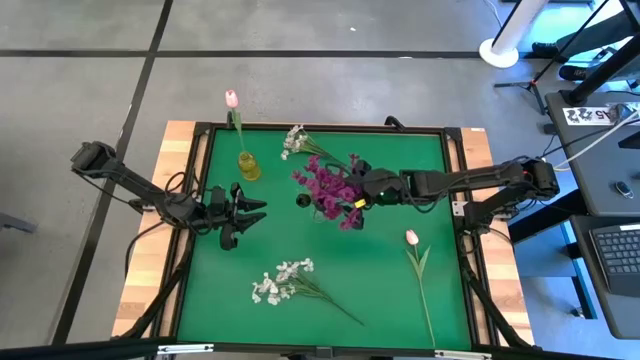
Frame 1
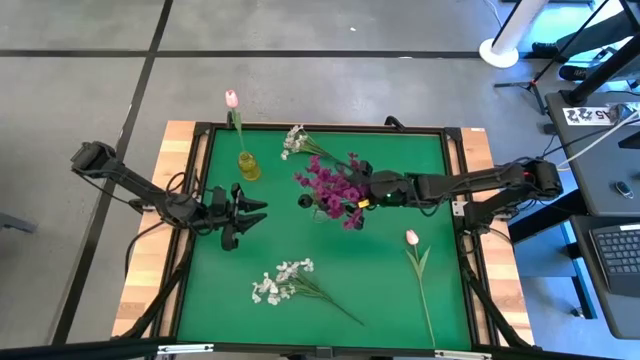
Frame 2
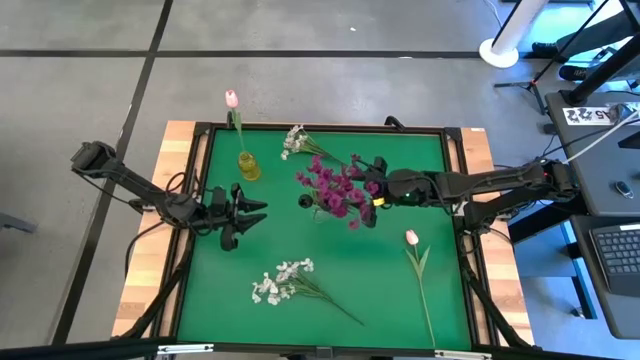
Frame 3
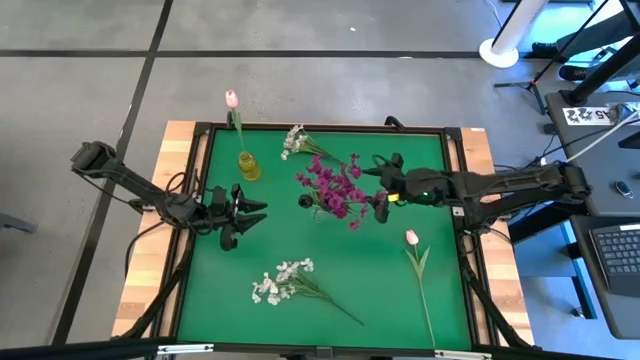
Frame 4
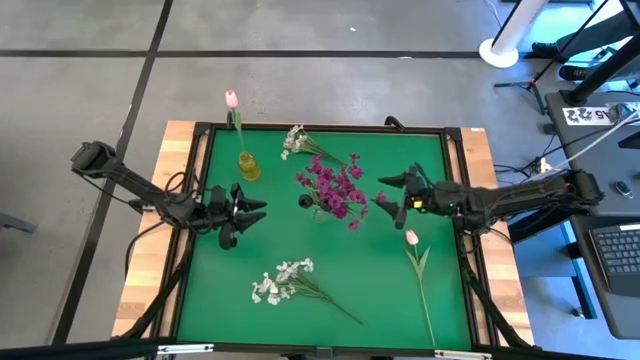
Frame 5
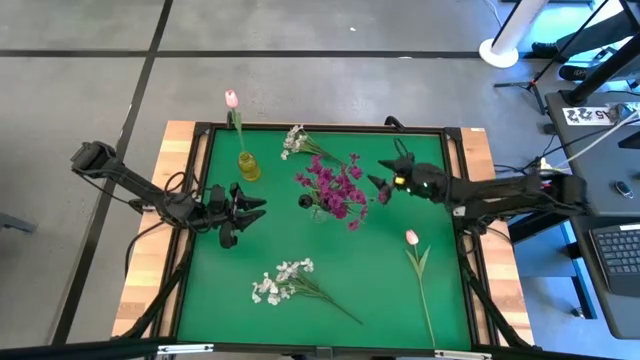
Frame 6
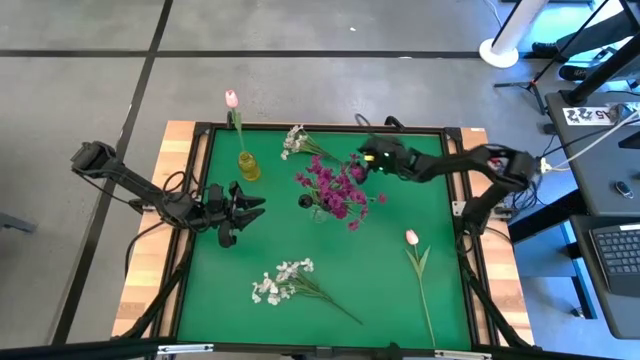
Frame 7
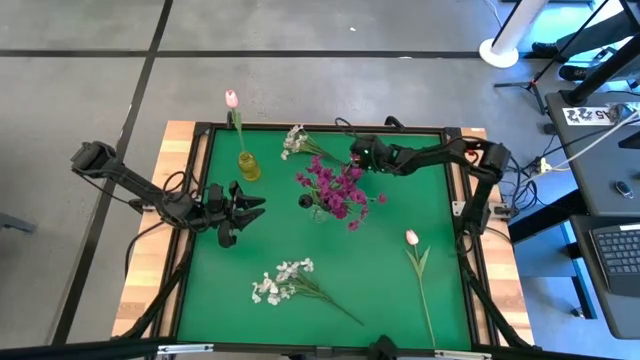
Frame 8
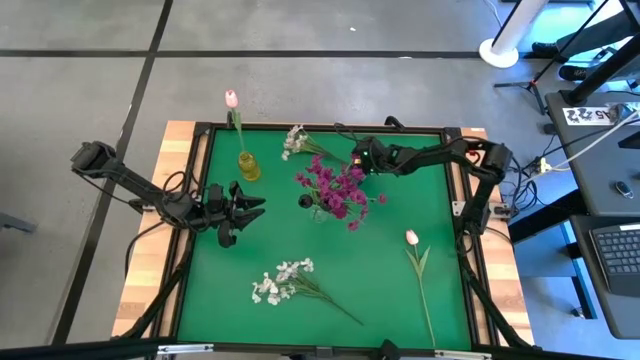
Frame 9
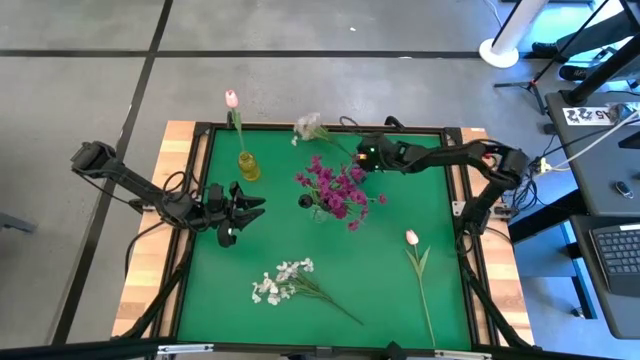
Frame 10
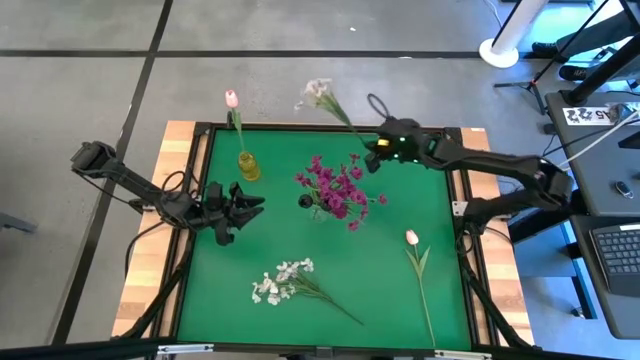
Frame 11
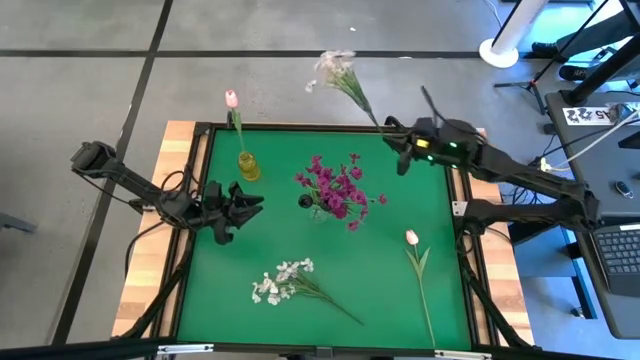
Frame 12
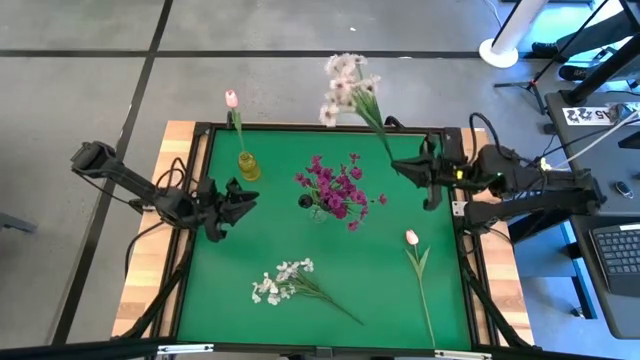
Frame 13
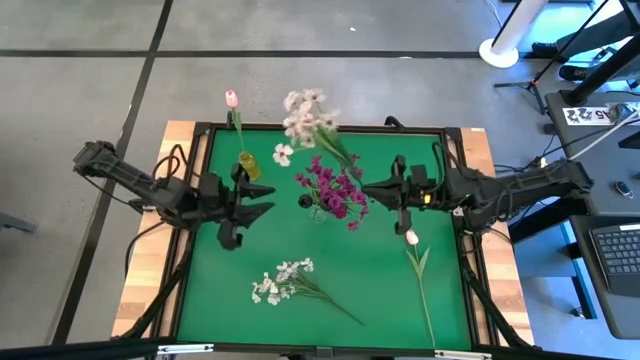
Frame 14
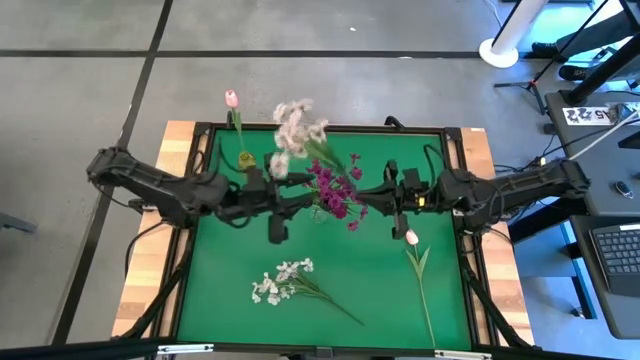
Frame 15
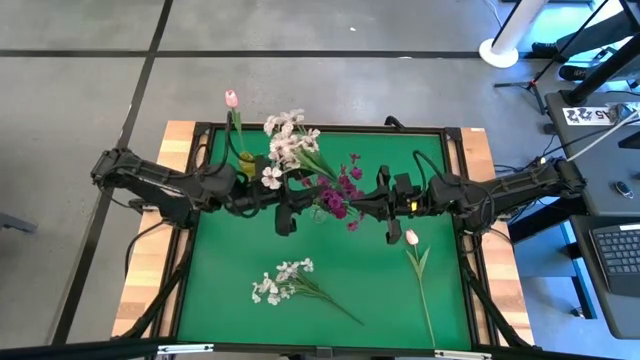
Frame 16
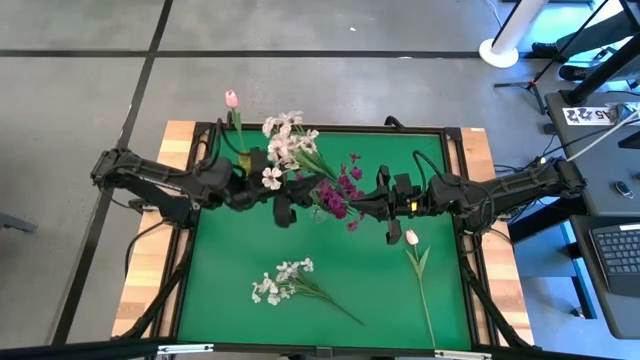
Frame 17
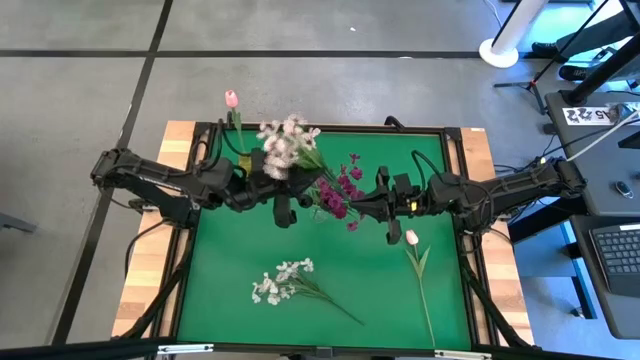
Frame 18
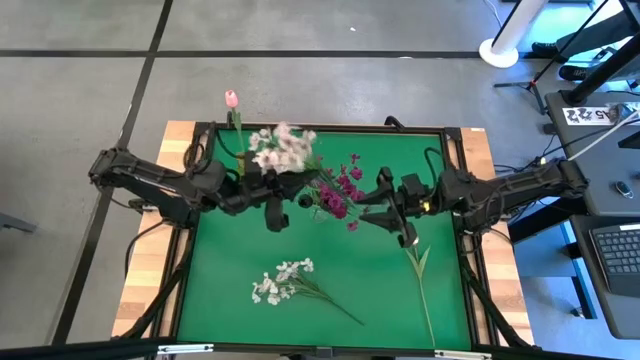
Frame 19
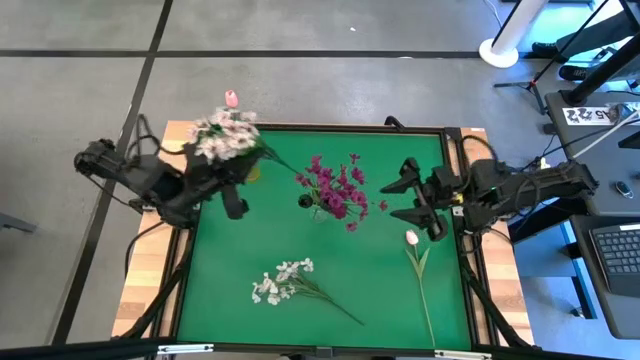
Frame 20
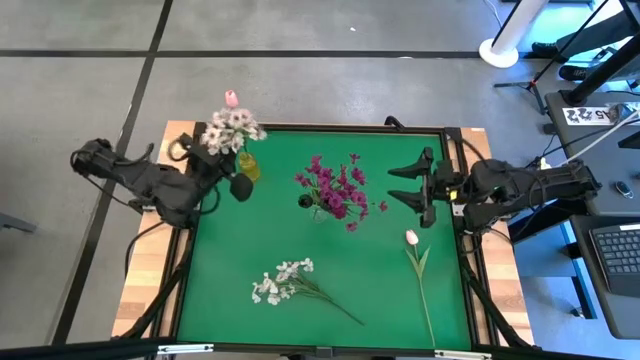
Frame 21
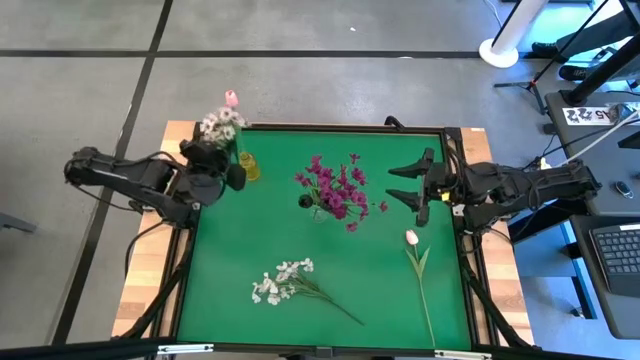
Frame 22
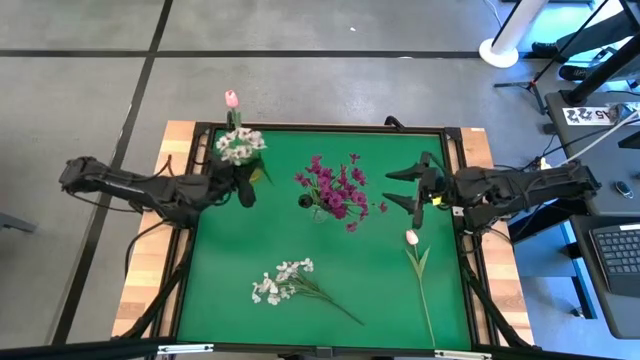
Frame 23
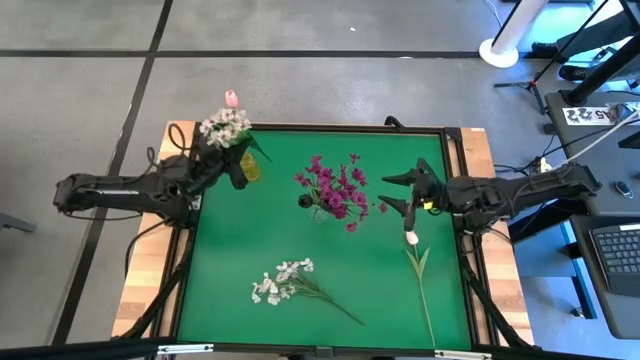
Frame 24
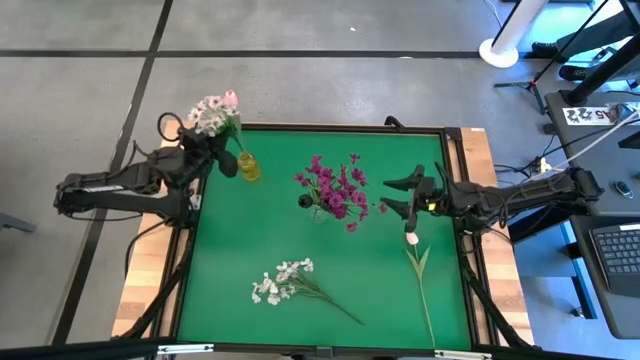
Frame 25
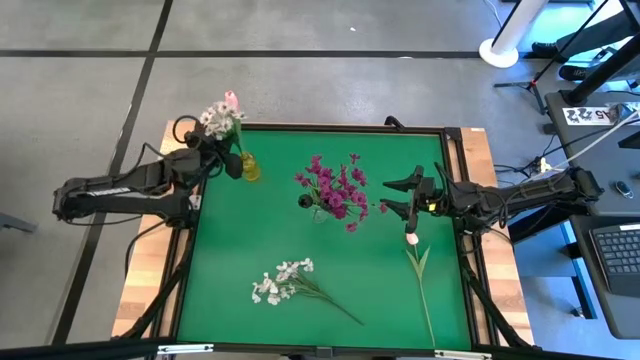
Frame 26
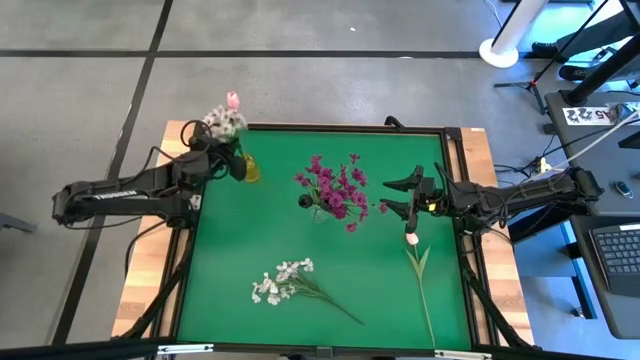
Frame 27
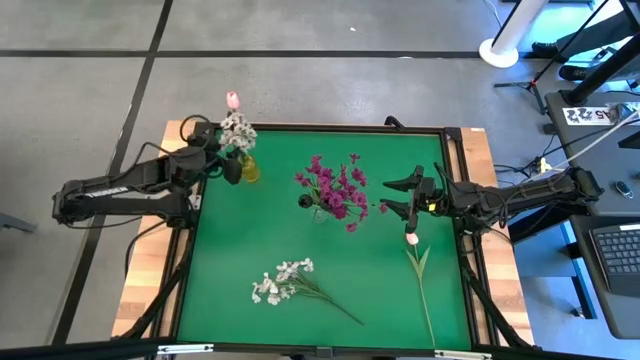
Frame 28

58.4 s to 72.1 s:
Task: Sort flowers into vase by color
Put the top white flowers into the yellow vase

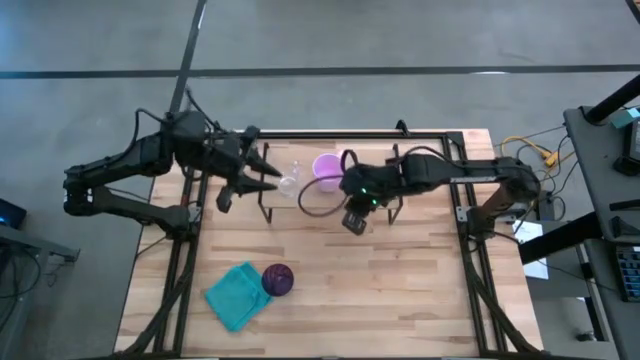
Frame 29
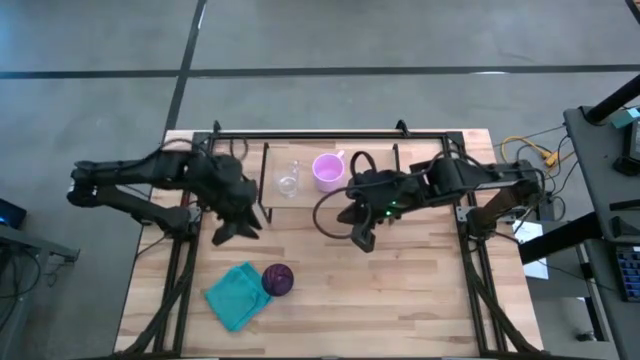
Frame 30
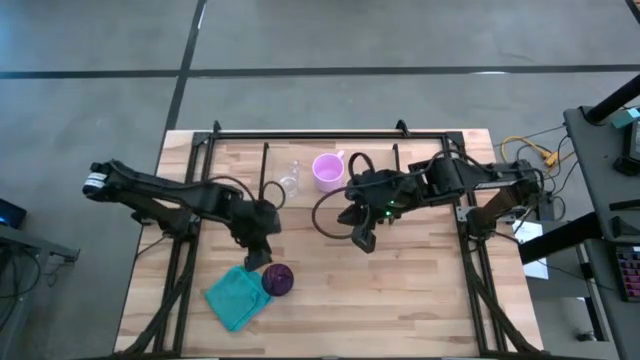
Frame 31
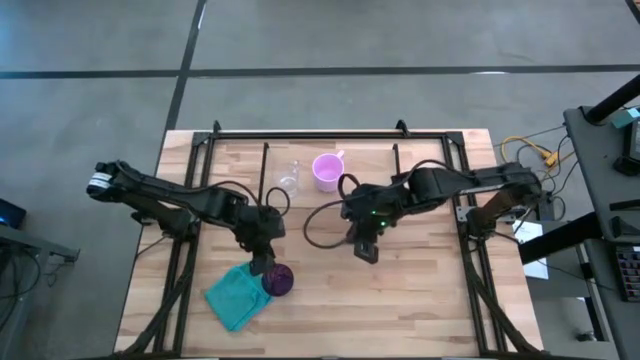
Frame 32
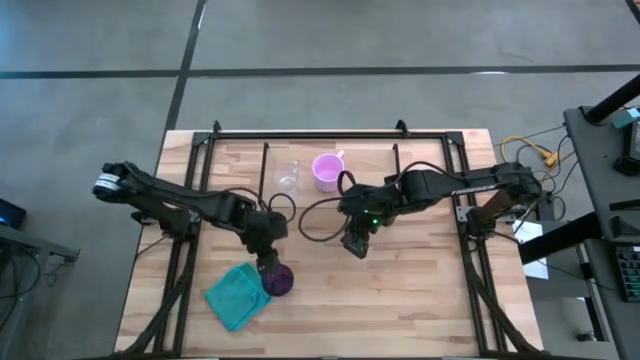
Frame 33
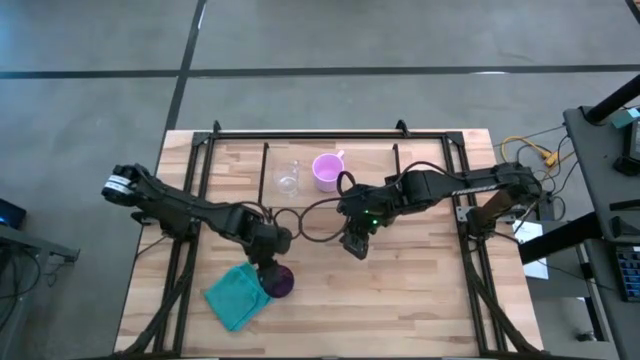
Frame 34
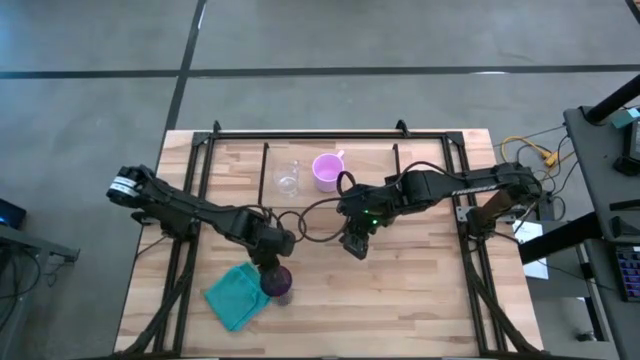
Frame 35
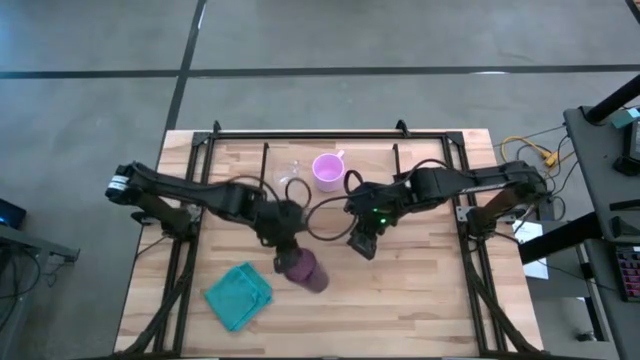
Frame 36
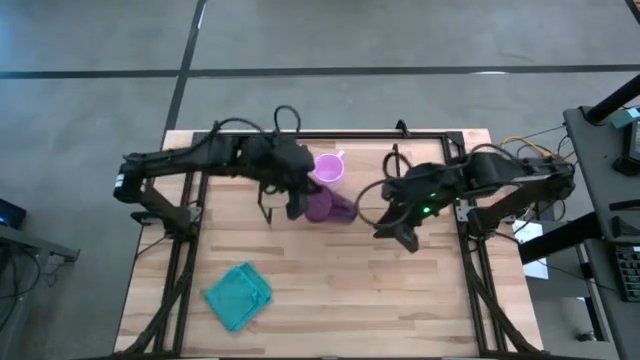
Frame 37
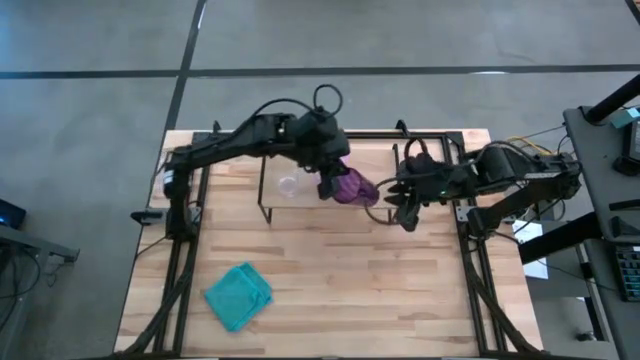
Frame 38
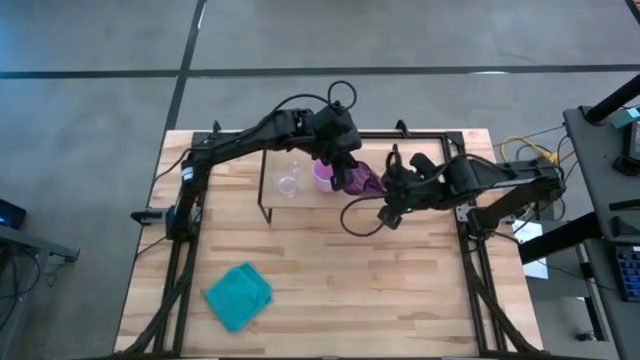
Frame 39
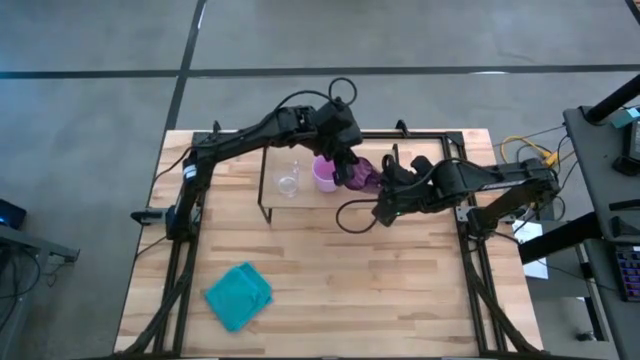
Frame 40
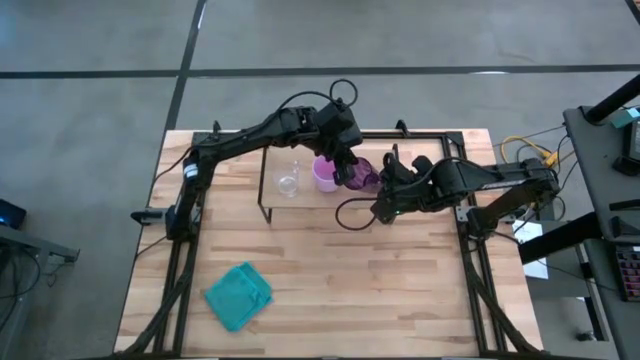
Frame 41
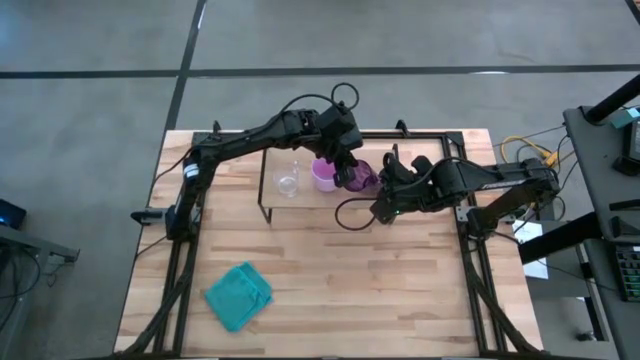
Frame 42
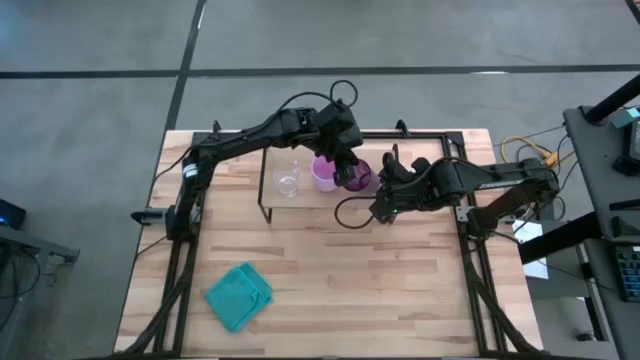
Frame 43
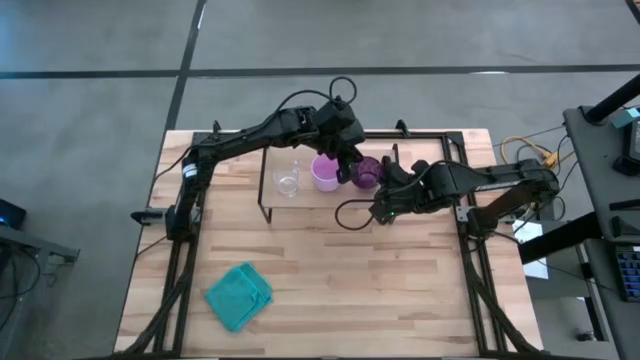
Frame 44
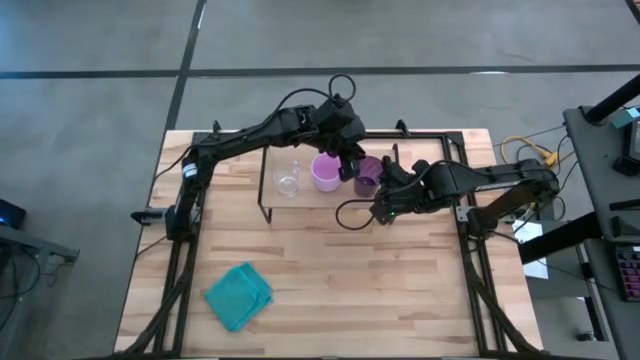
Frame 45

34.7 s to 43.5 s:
Task: Stack small to large cups/mugs on shelf
Put the violet cup on the shelf
